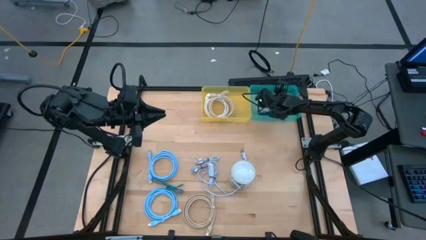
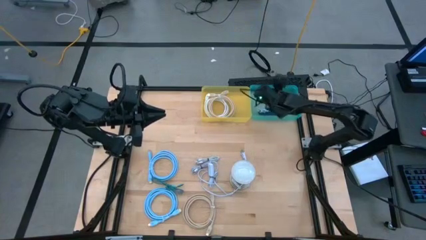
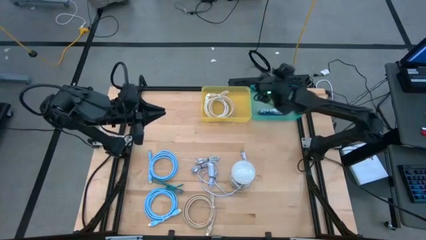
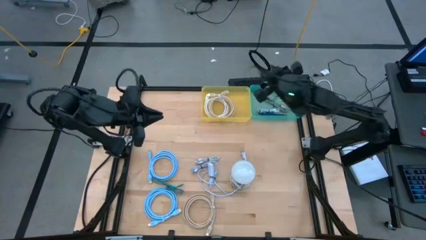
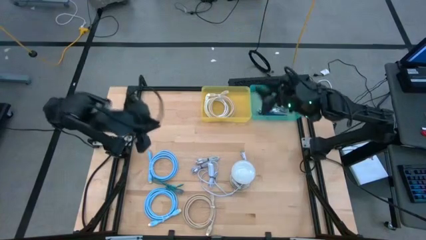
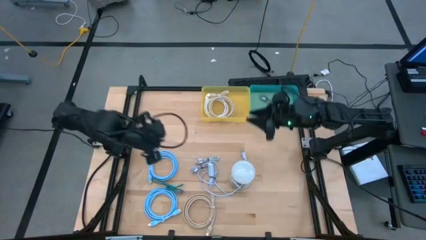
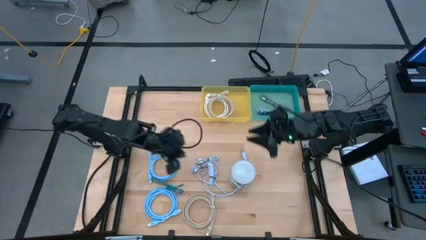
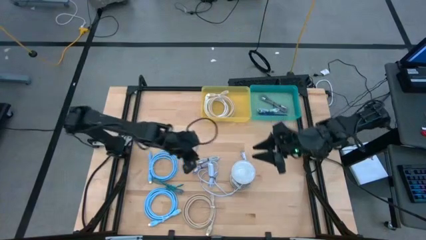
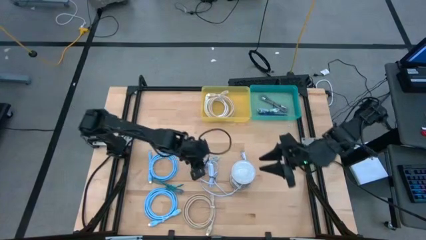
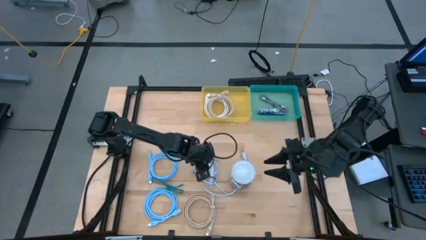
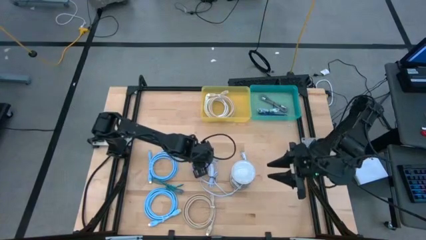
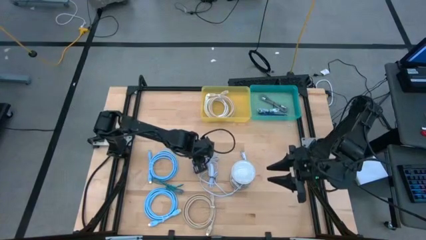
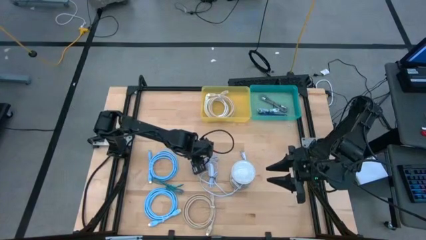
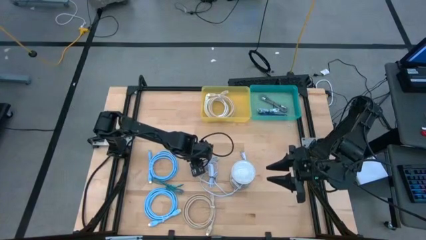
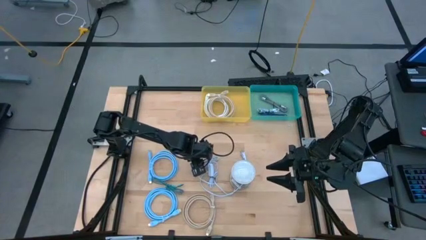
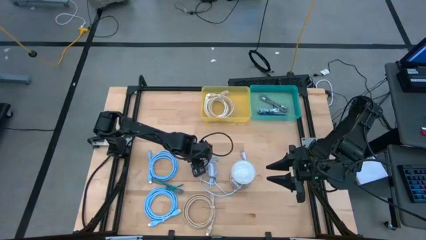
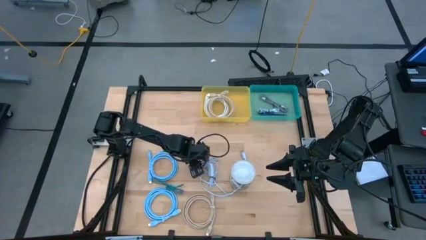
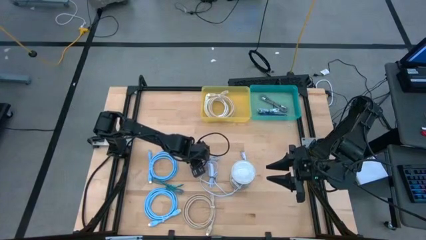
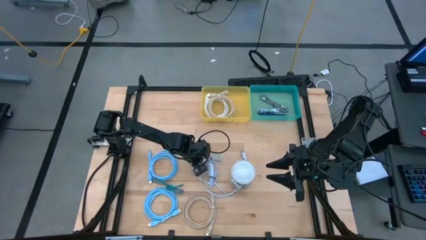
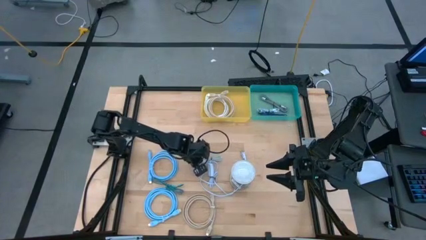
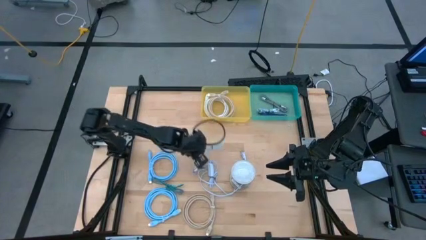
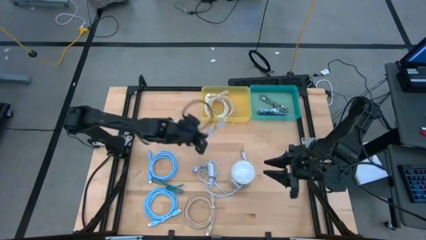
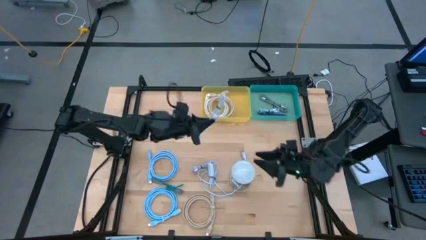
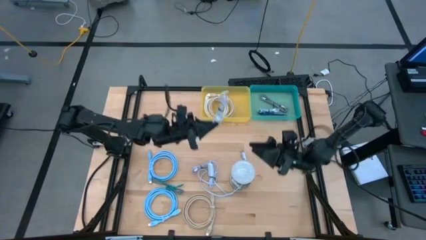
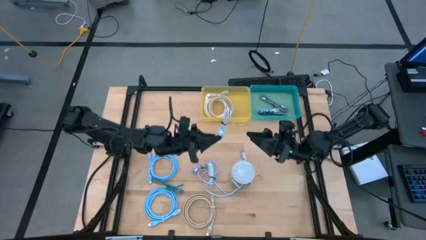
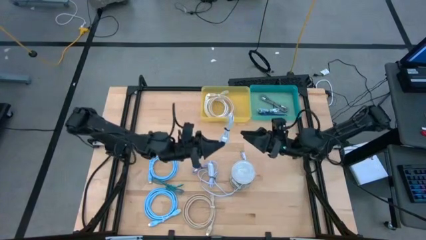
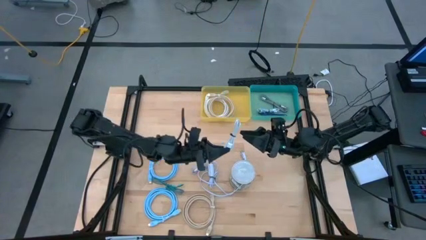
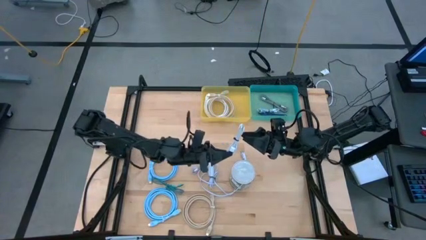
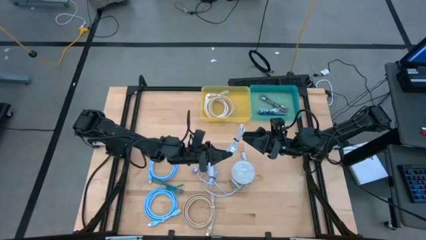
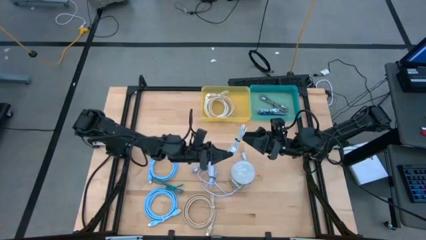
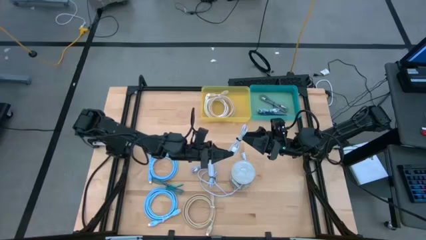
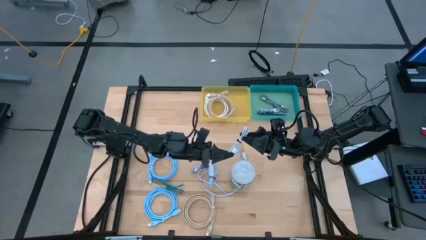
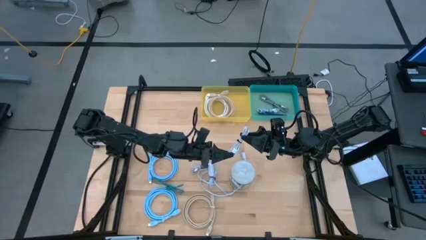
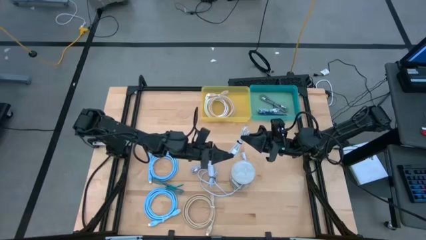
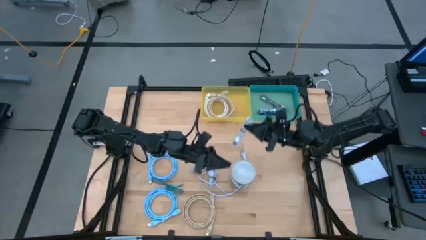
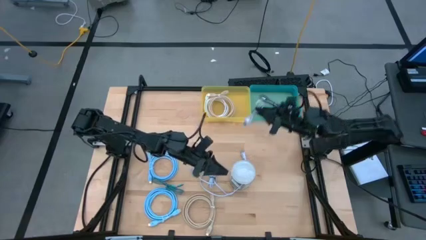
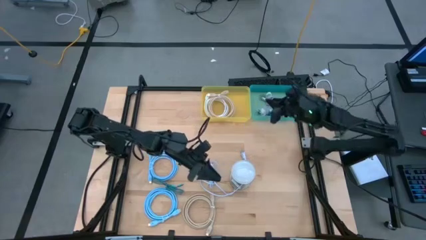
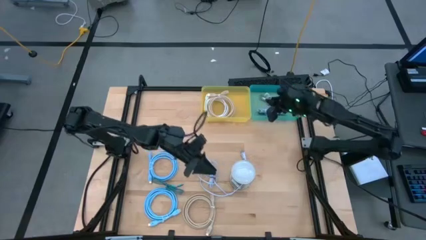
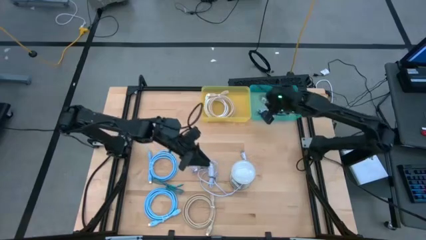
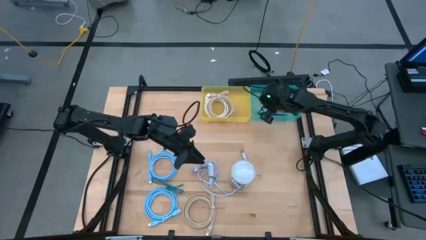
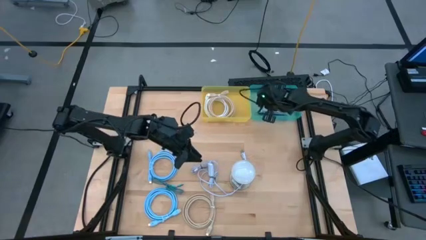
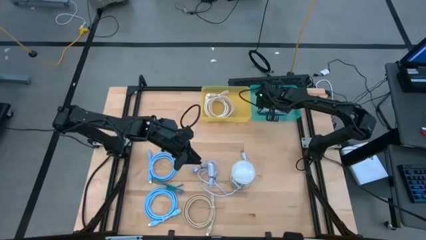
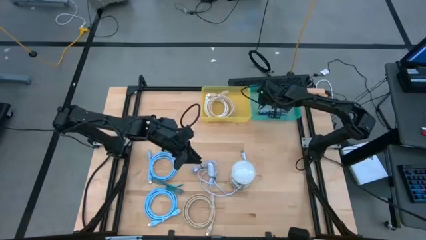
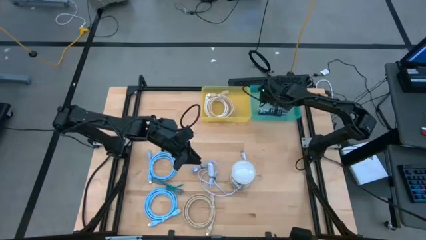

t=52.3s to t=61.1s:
Task: Pick & Place USB Port
Put the blue charger cable into the green bin

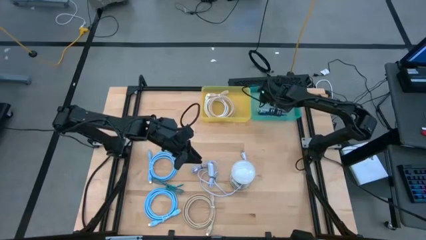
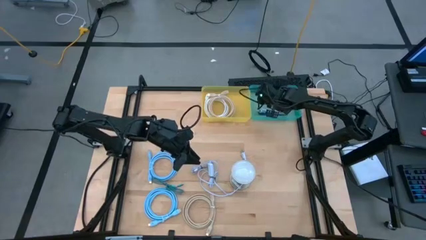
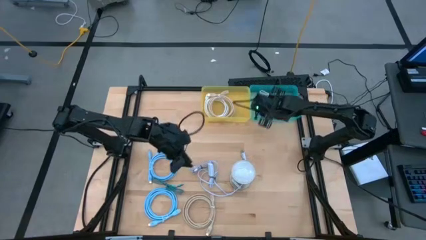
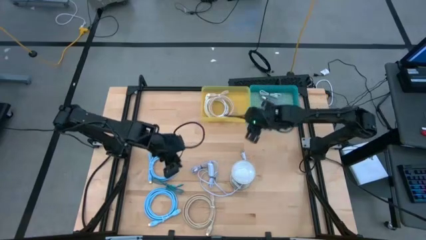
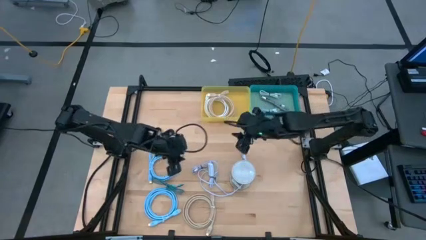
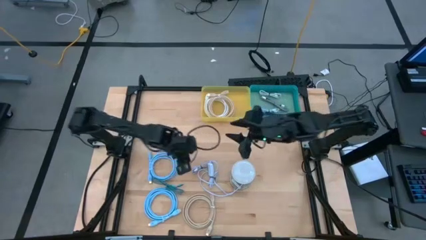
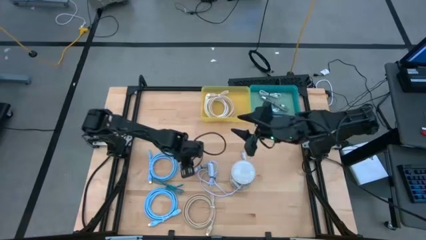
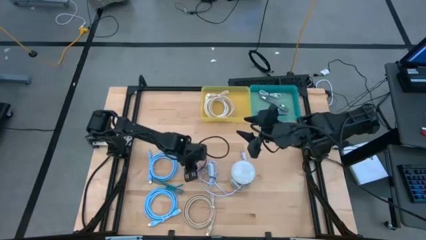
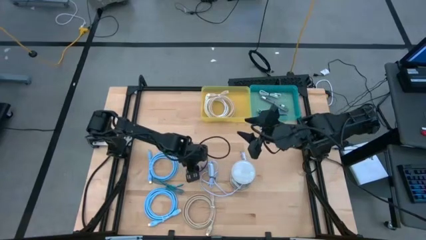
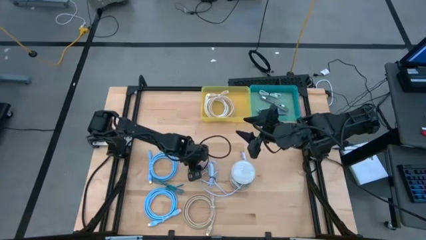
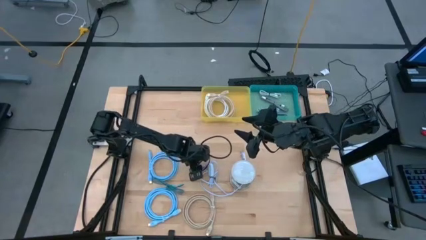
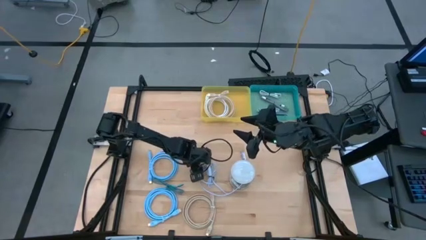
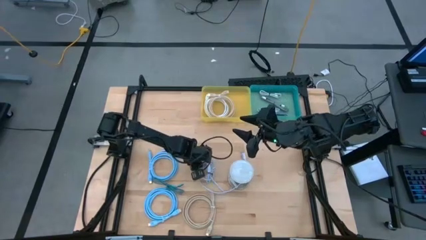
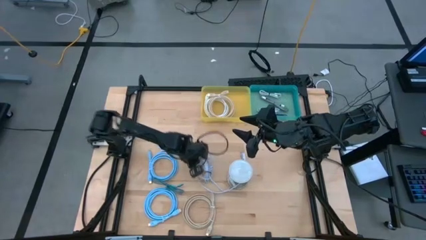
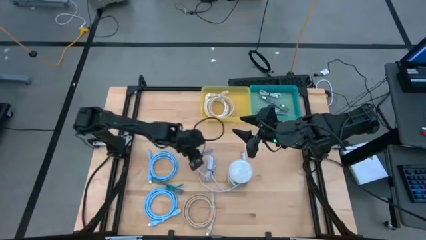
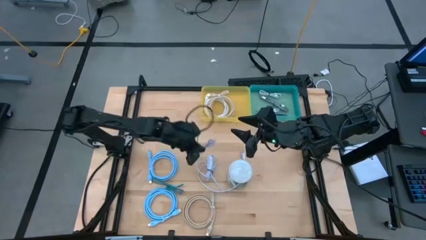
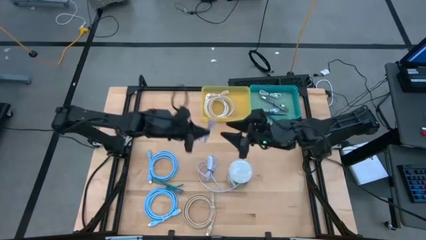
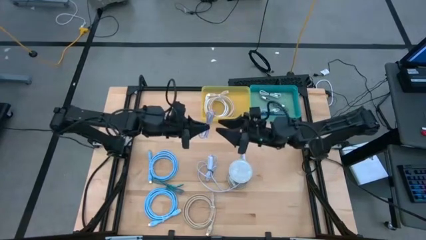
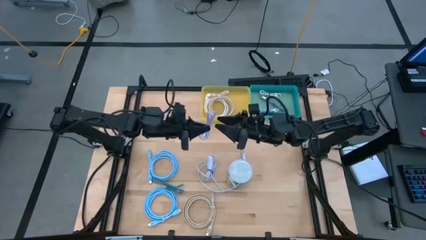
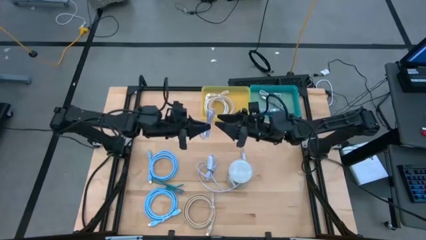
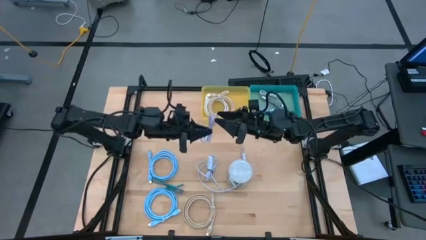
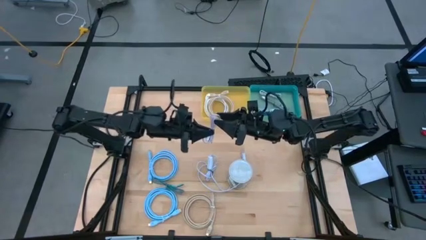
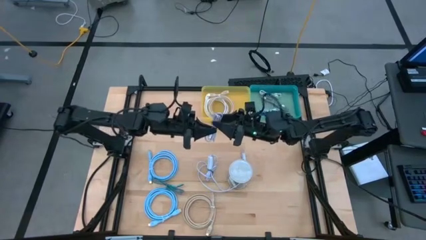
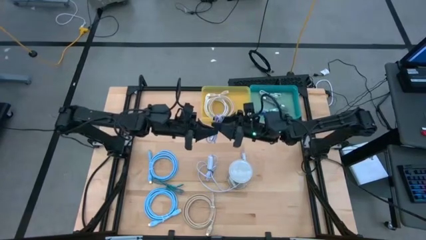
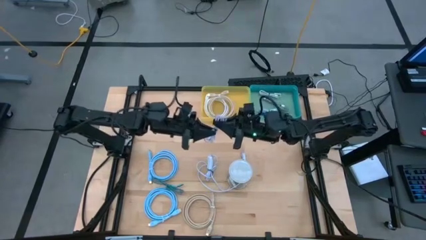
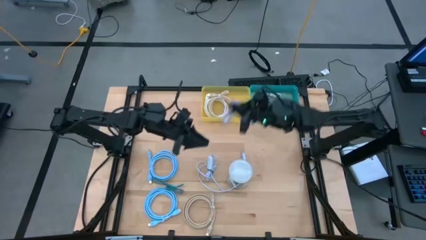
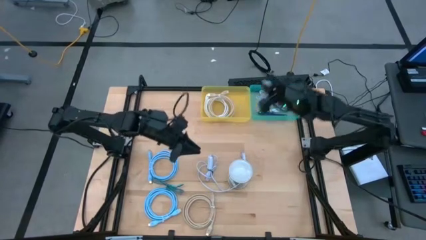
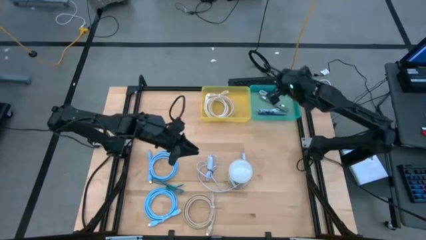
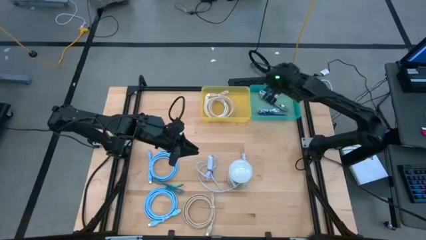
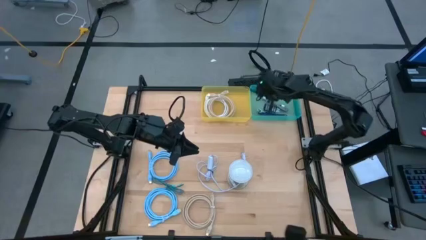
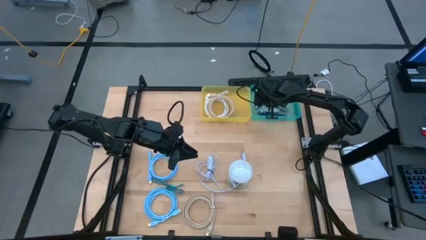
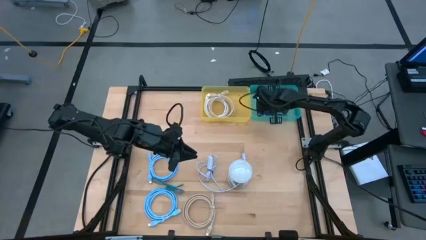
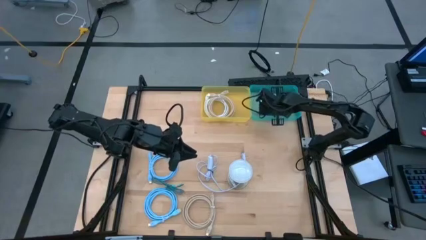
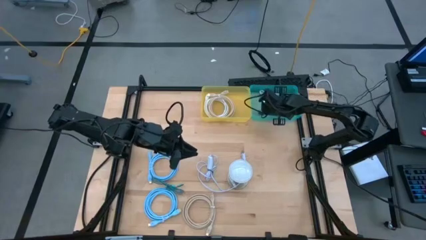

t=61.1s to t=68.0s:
Put the purple charger cable into the green bin
